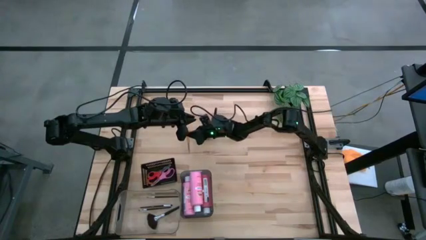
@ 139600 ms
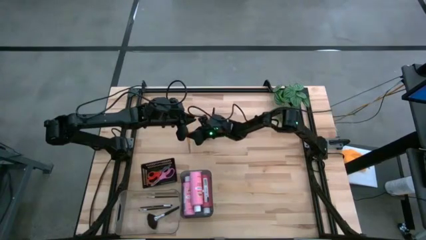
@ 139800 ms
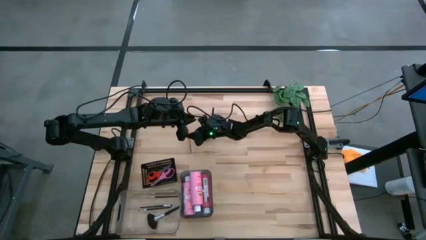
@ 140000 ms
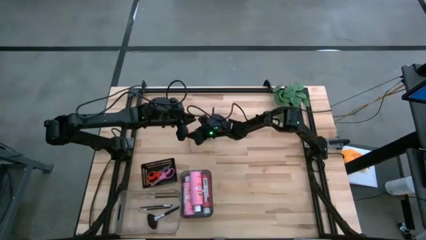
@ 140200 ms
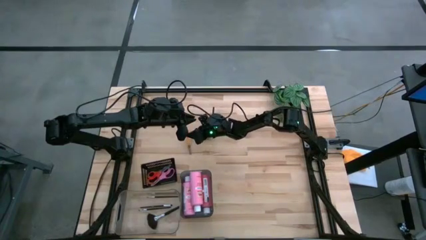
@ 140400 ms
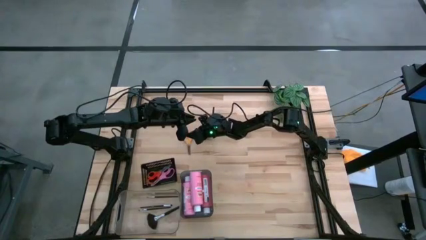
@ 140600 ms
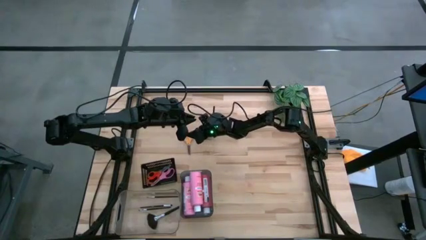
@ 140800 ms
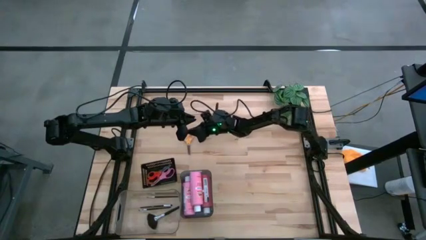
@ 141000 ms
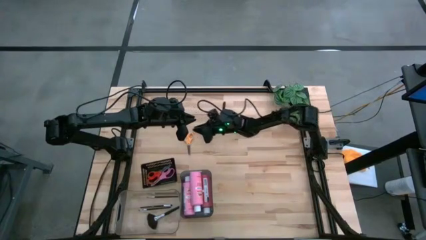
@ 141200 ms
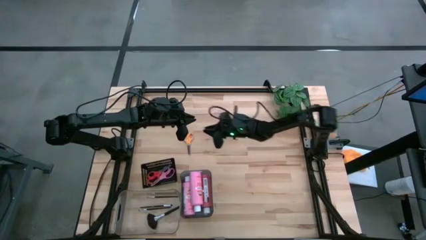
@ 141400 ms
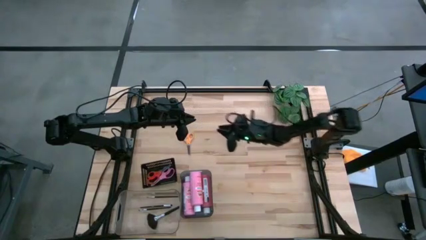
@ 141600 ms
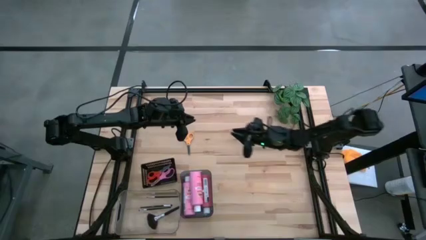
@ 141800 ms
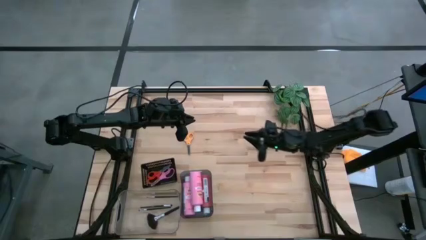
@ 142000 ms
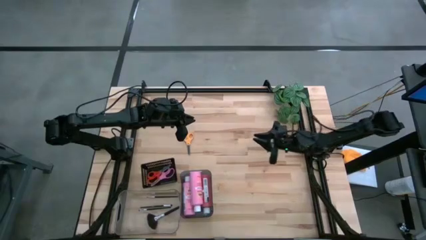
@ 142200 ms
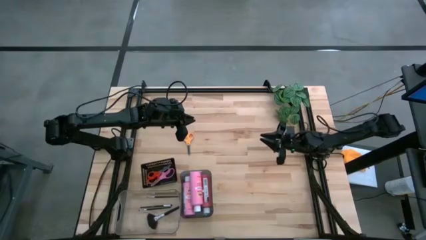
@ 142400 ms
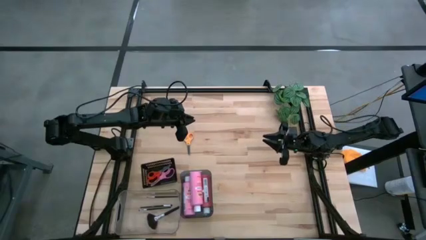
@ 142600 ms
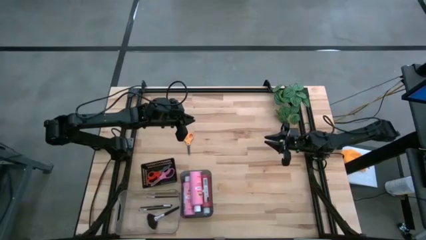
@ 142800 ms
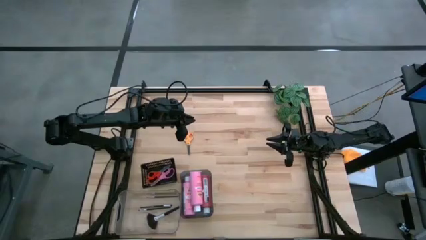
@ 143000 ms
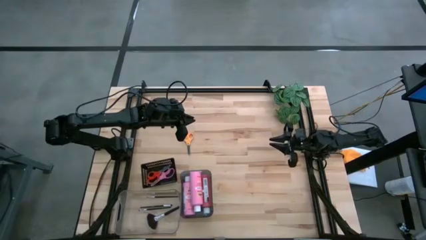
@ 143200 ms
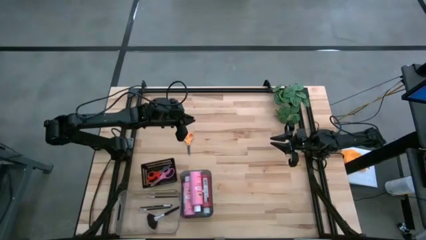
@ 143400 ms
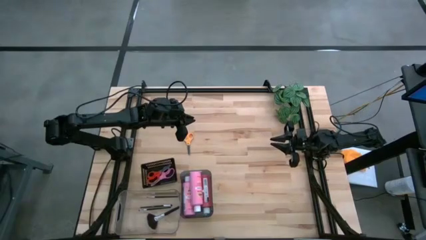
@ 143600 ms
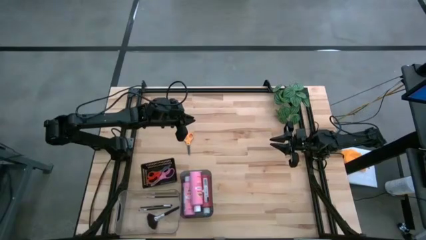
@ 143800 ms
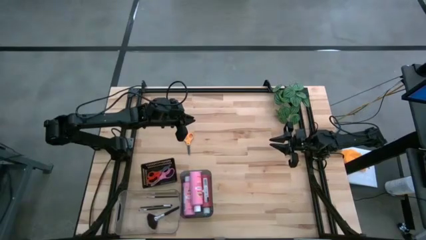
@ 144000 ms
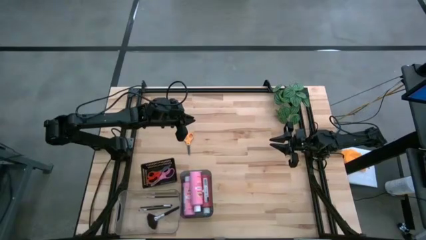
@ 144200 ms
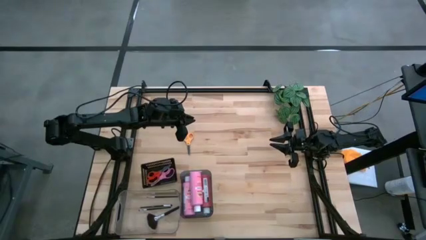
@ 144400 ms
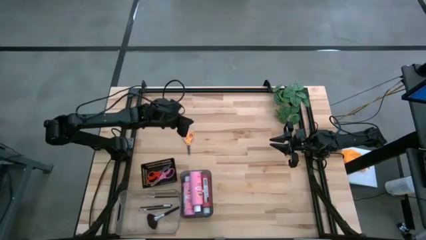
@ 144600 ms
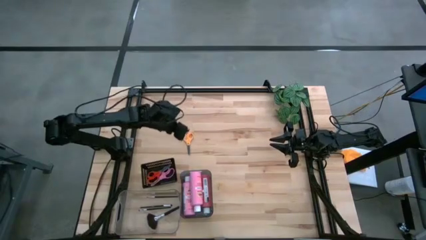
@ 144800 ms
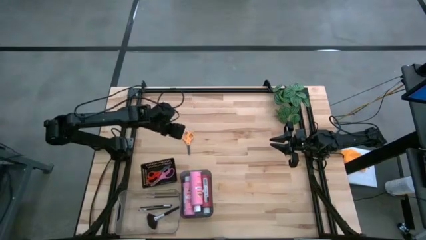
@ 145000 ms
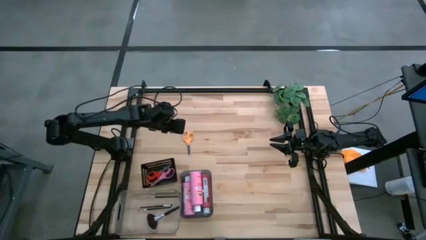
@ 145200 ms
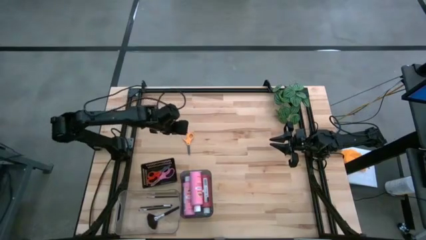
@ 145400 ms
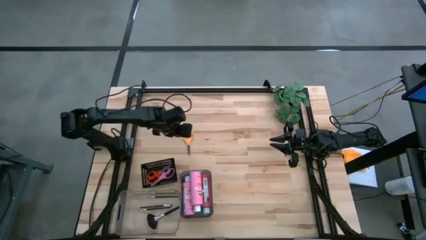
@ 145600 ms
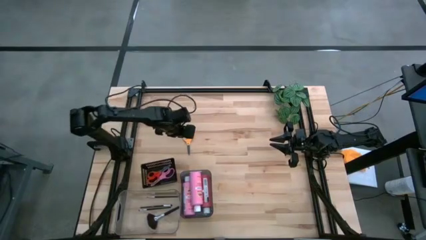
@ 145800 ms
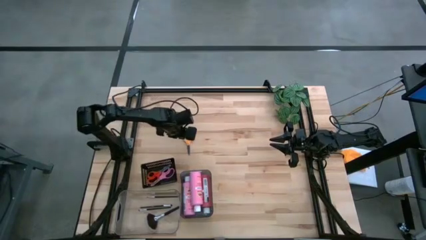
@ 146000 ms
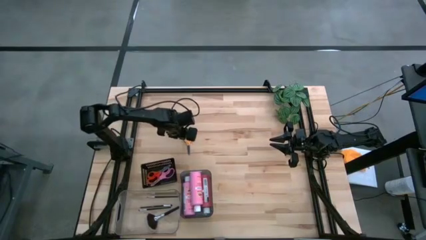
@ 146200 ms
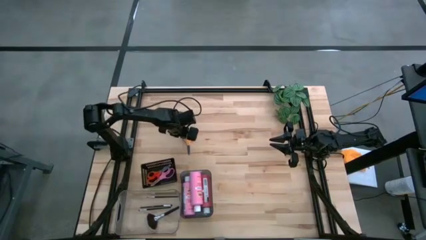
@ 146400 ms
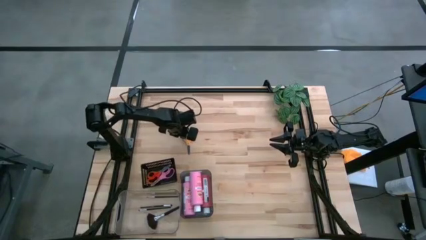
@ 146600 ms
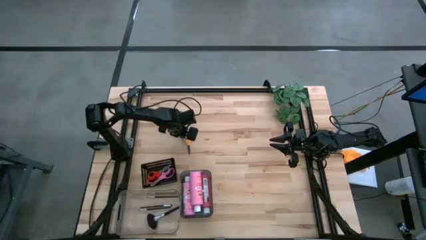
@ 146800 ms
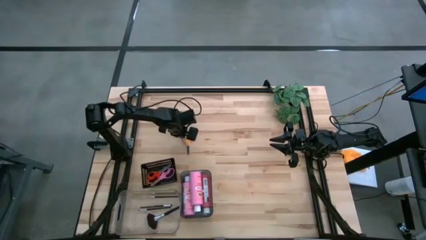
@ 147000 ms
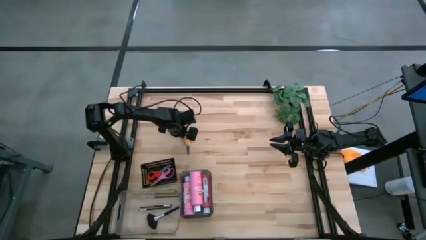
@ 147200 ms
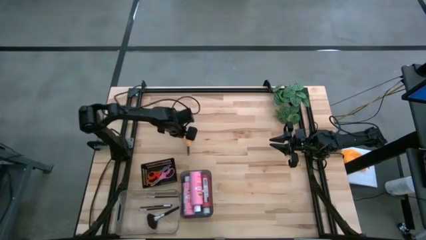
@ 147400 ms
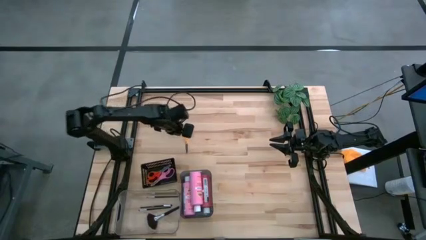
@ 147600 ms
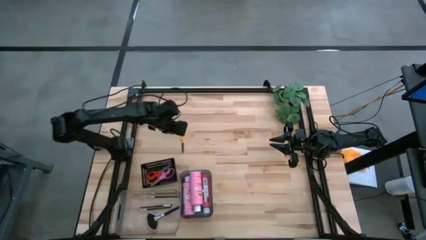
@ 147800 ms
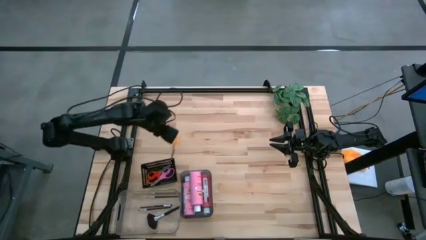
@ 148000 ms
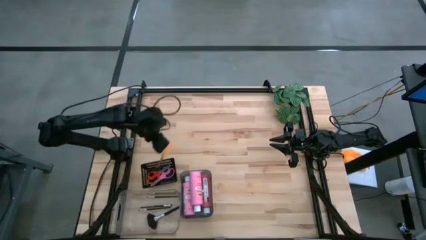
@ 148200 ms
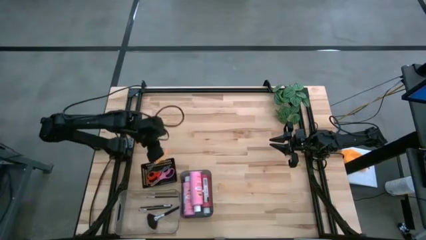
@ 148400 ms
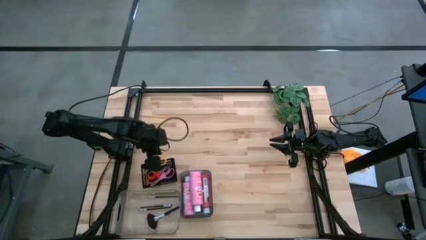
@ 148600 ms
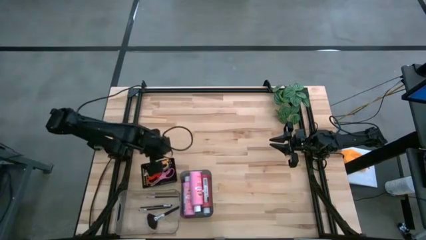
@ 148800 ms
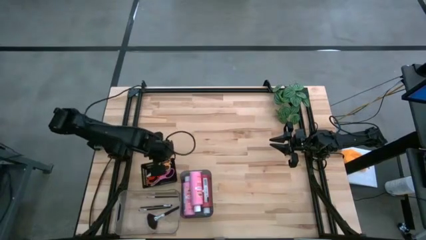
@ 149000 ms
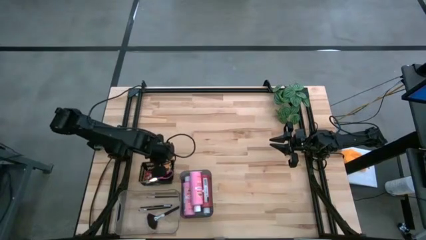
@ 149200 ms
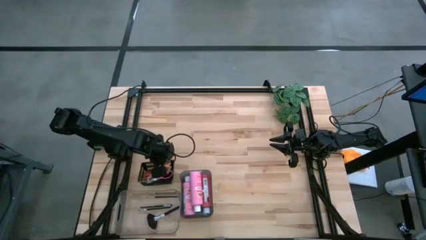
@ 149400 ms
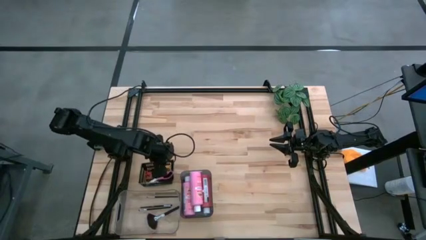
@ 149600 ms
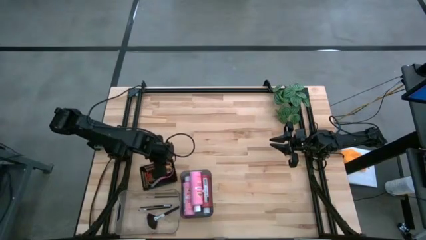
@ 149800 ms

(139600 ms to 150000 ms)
Task: Pick & Place Paint Supplies
Put the yellow scissors into the black bin

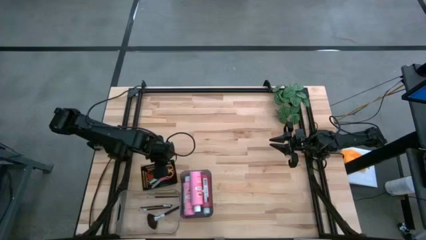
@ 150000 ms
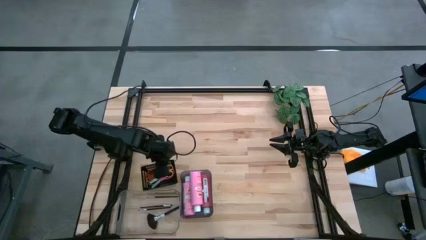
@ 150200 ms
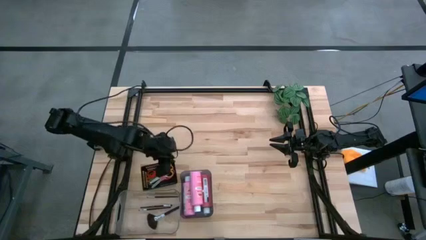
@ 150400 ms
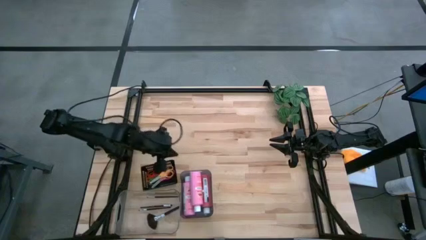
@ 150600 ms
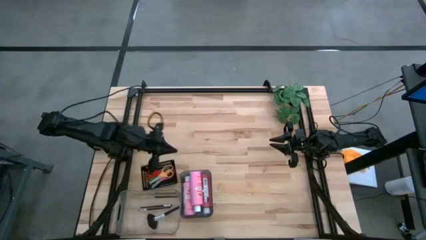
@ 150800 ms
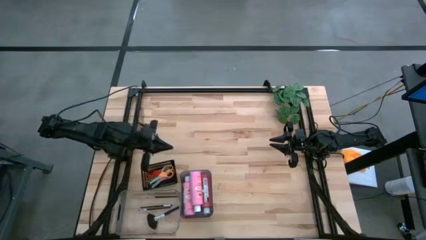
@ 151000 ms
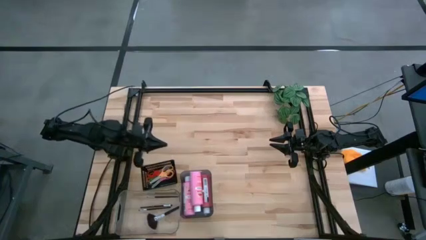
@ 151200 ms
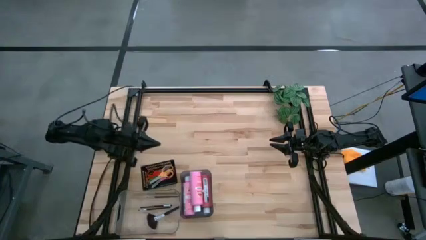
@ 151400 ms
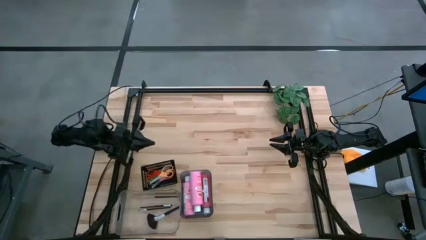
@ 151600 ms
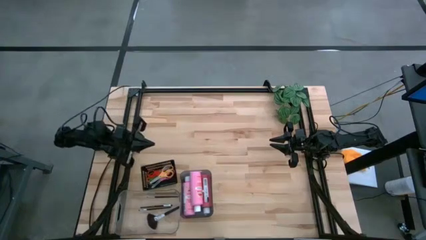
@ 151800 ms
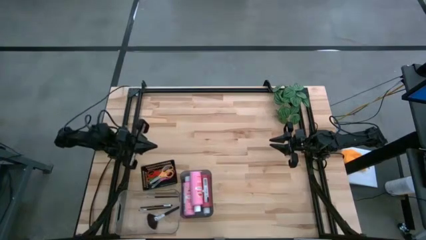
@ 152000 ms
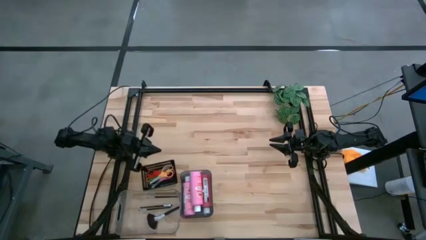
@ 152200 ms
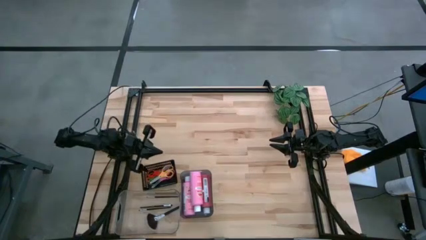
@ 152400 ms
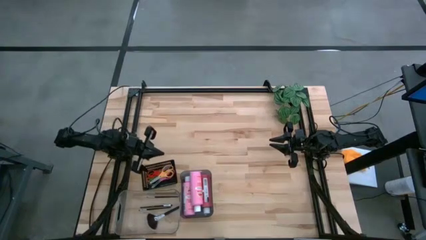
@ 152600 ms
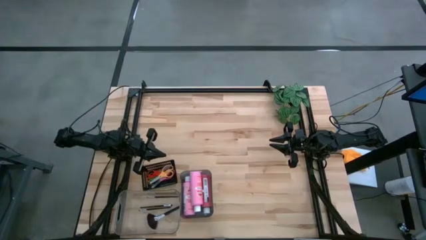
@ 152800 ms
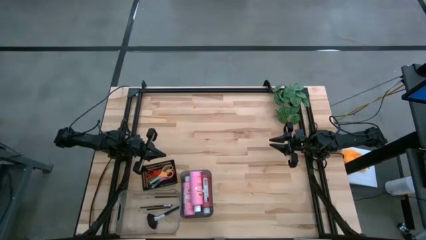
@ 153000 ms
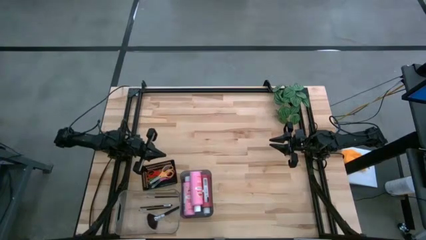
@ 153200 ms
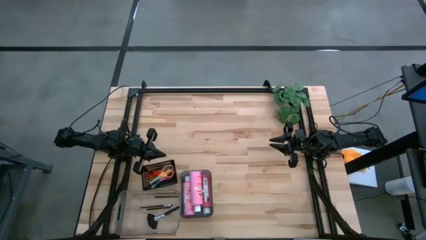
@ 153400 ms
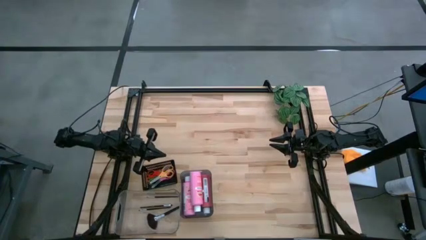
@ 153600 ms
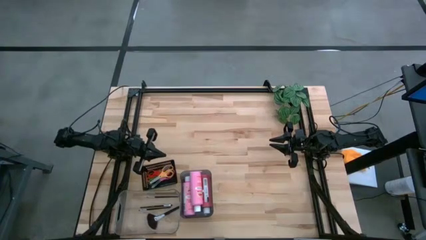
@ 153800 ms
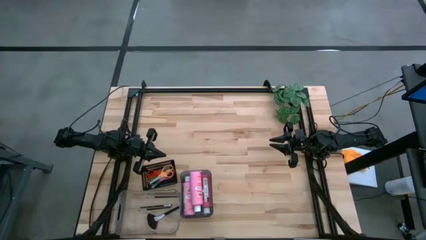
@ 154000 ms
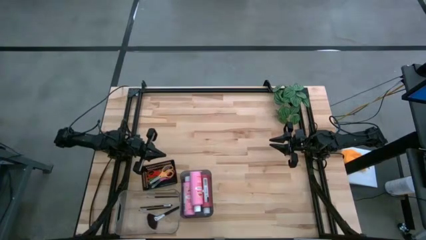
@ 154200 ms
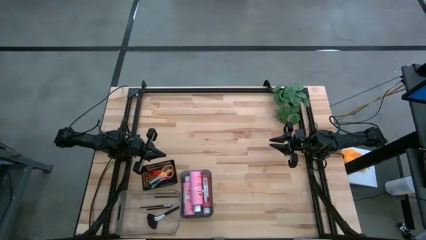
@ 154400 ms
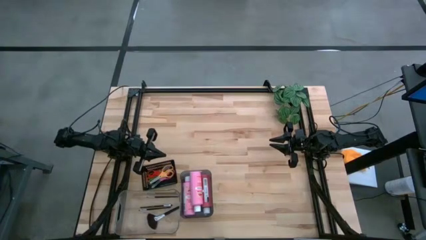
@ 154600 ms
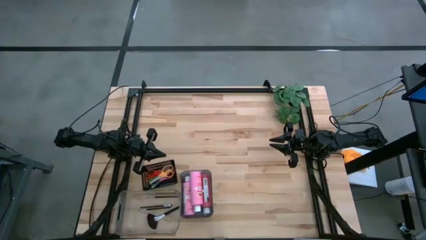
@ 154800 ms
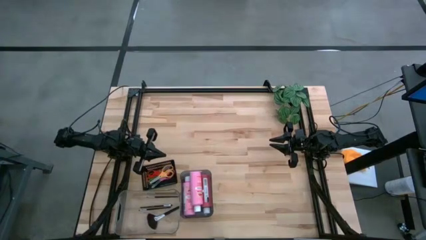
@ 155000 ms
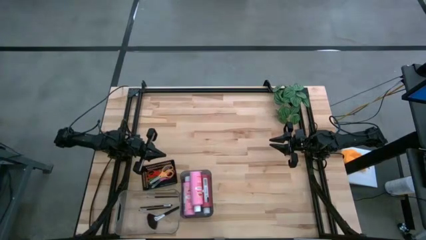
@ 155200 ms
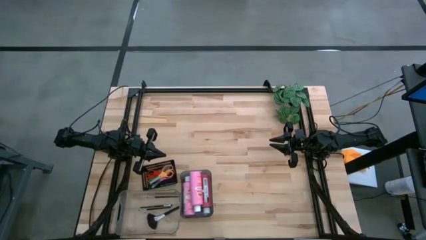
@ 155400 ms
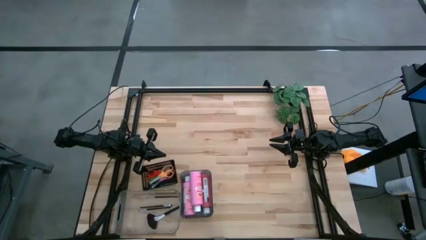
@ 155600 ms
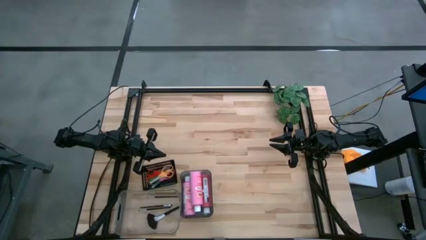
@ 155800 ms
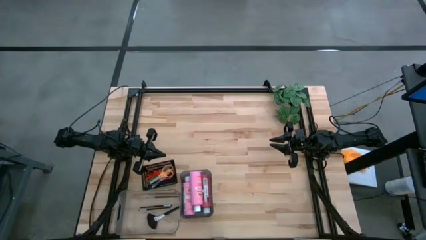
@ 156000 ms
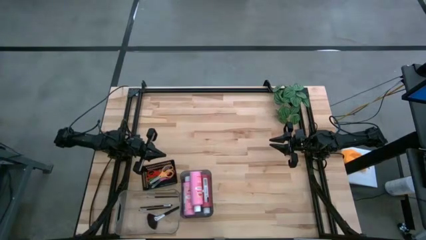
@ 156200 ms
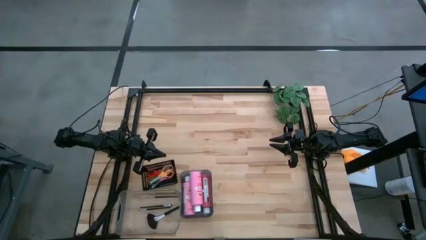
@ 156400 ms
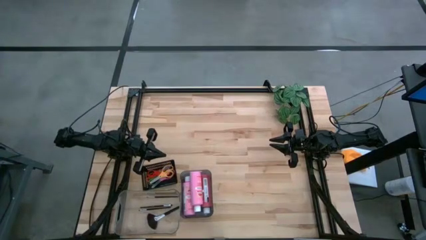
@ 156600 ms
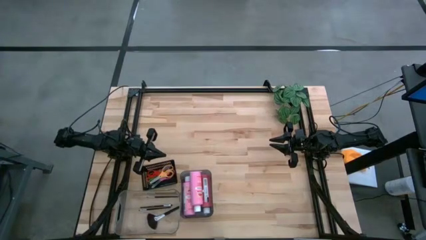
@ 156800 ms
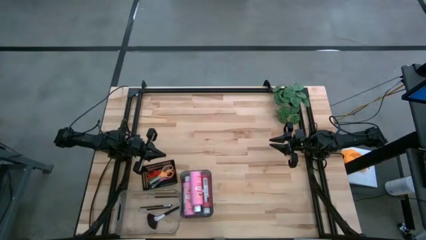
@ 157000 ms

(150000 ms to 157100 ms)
Return to Home Position
